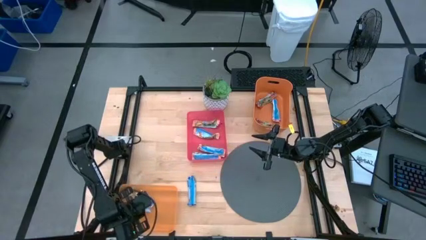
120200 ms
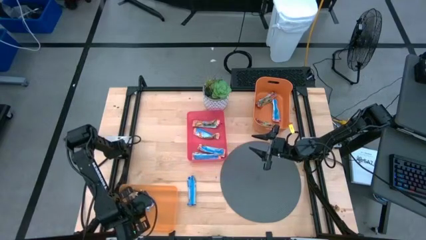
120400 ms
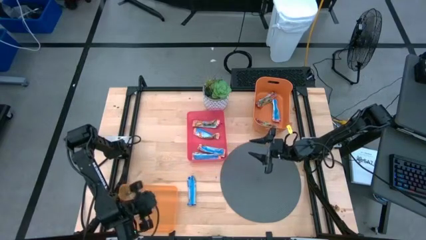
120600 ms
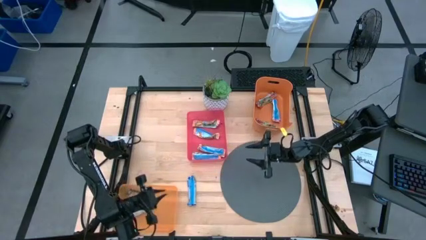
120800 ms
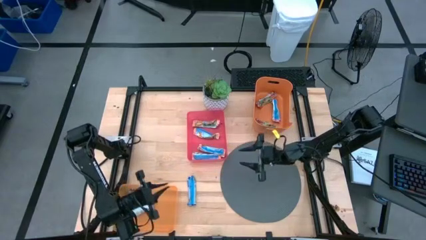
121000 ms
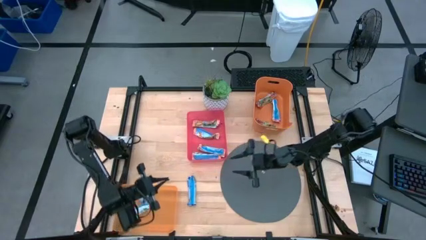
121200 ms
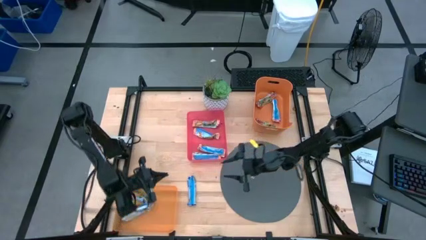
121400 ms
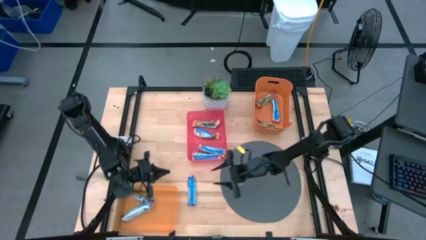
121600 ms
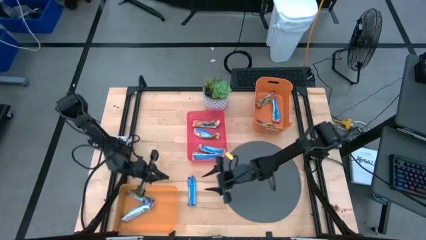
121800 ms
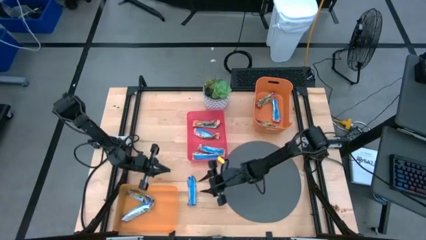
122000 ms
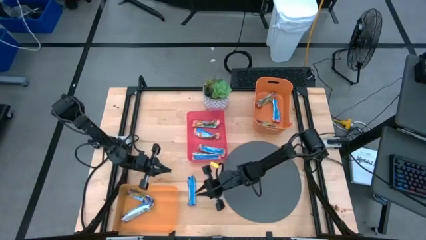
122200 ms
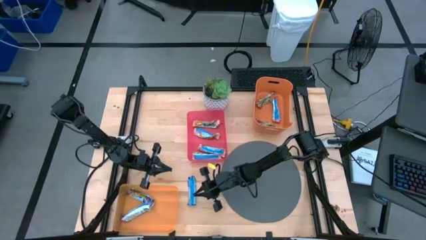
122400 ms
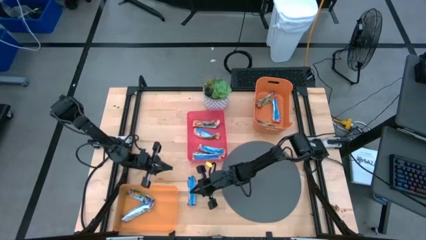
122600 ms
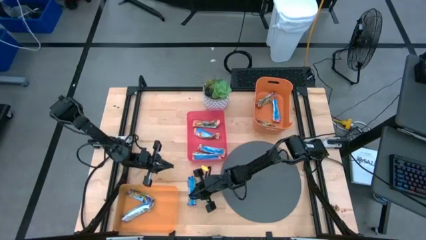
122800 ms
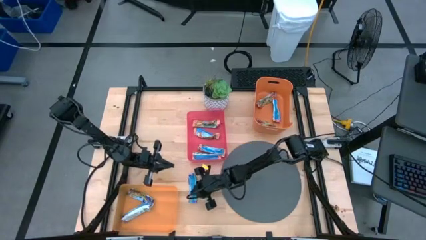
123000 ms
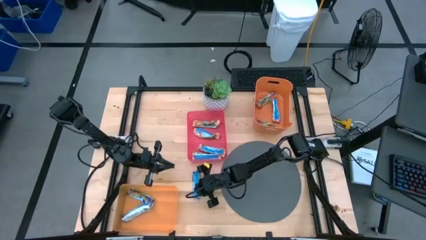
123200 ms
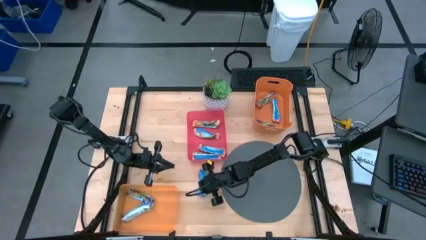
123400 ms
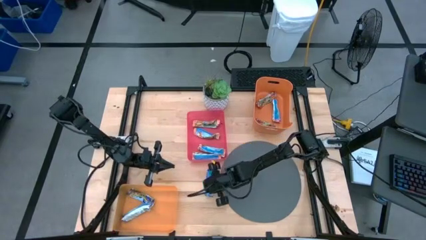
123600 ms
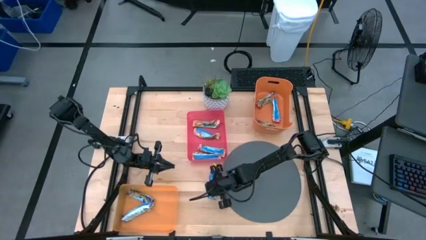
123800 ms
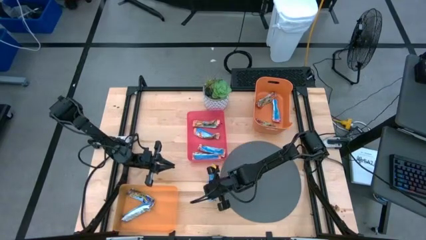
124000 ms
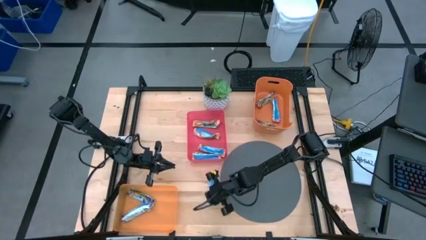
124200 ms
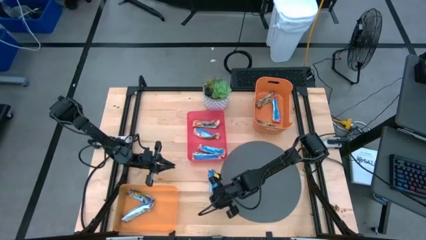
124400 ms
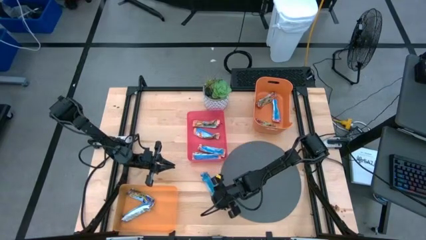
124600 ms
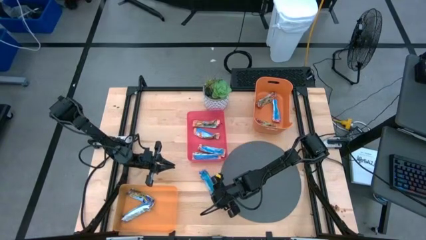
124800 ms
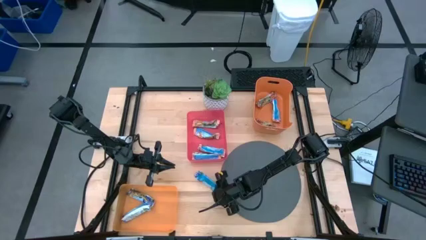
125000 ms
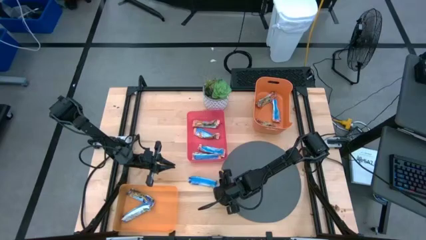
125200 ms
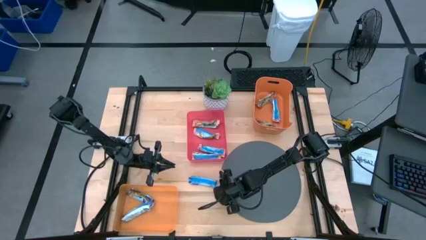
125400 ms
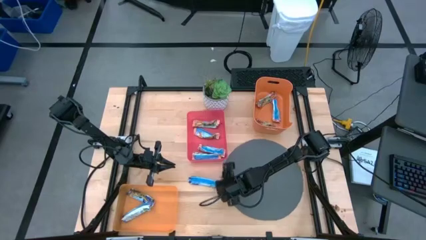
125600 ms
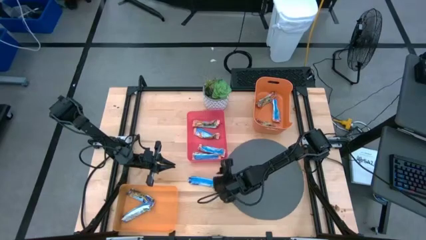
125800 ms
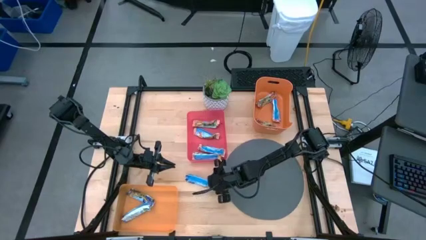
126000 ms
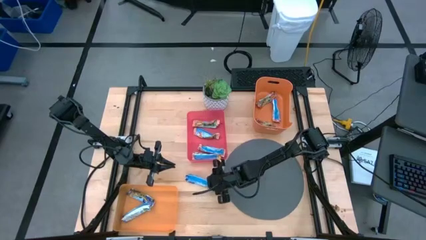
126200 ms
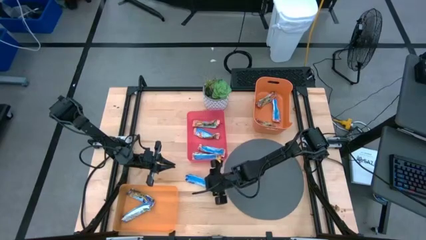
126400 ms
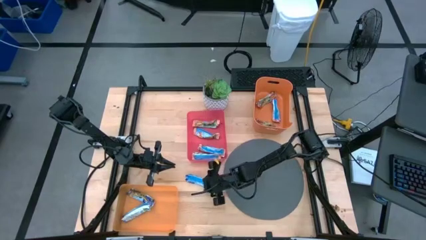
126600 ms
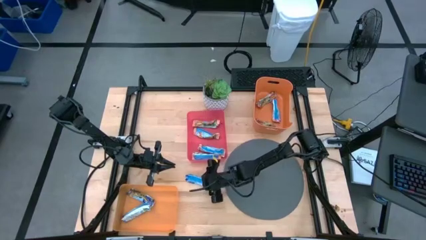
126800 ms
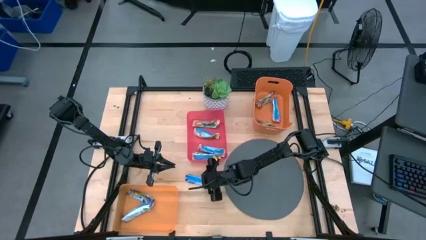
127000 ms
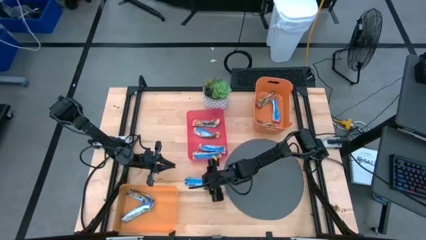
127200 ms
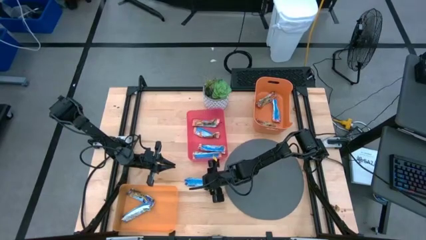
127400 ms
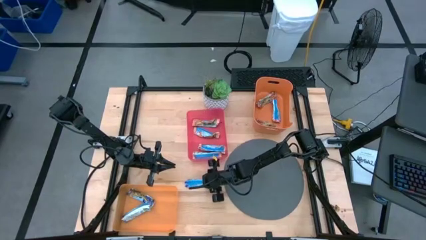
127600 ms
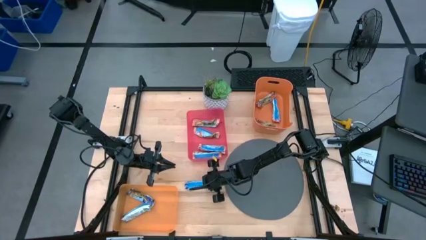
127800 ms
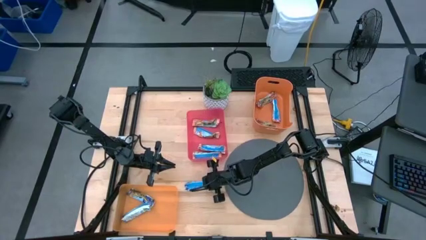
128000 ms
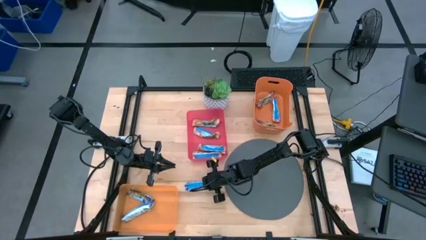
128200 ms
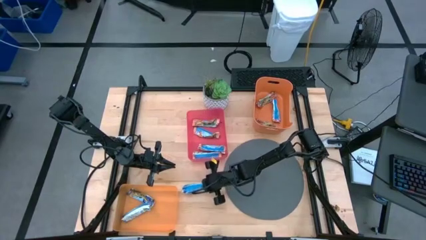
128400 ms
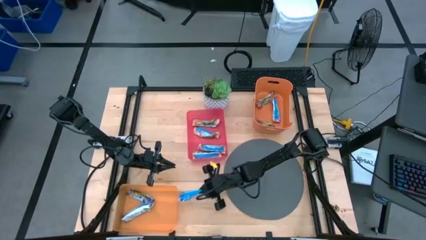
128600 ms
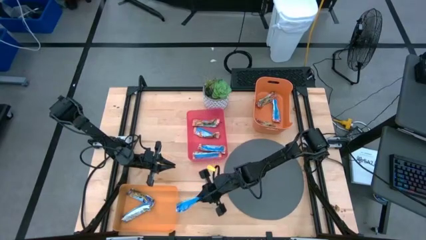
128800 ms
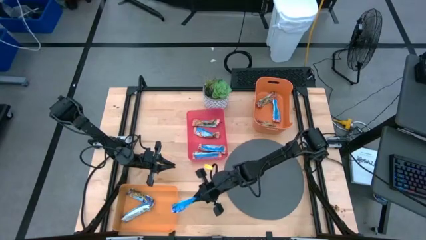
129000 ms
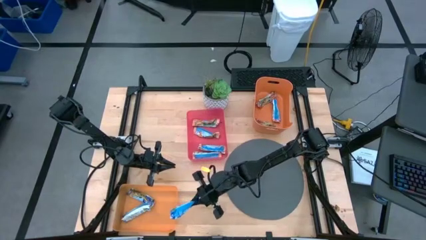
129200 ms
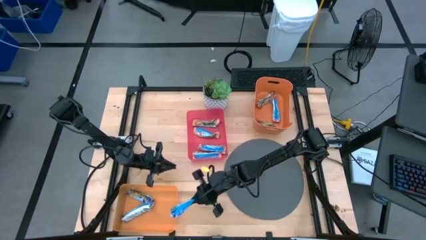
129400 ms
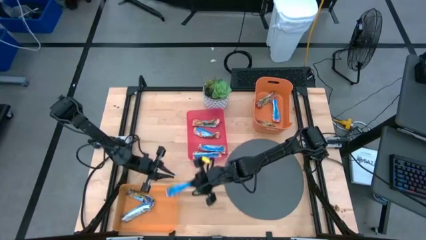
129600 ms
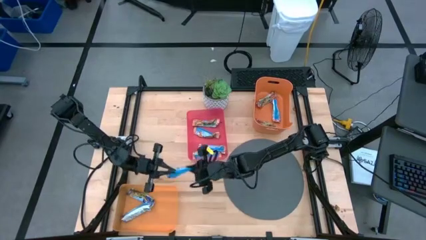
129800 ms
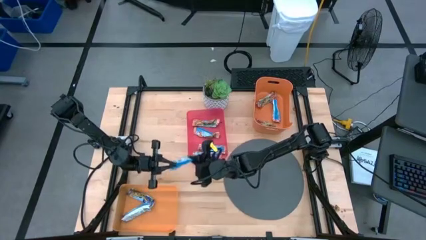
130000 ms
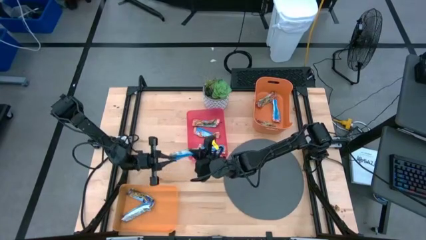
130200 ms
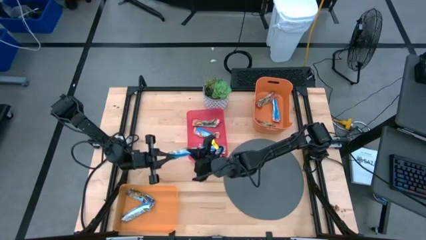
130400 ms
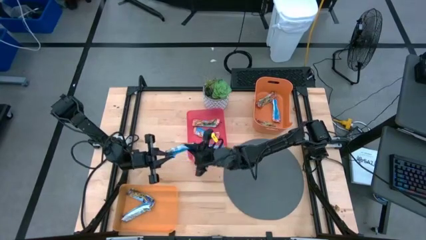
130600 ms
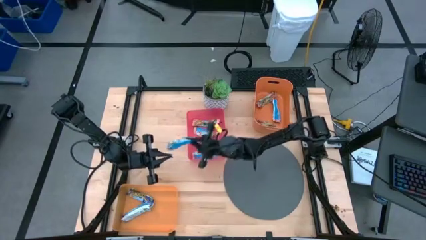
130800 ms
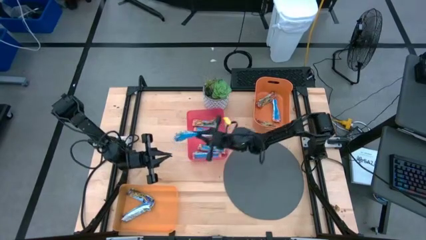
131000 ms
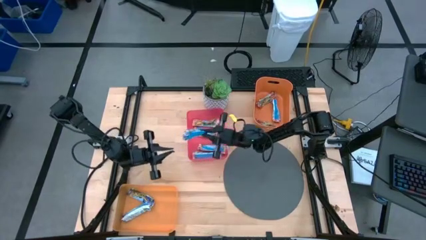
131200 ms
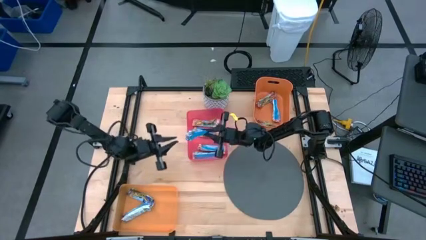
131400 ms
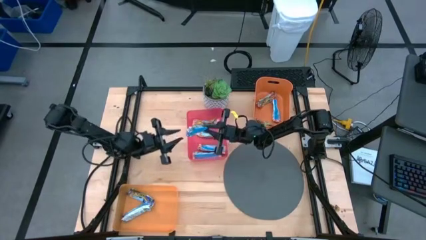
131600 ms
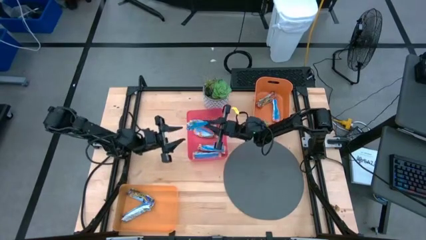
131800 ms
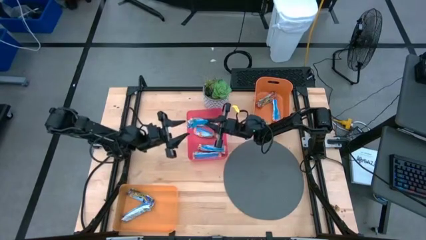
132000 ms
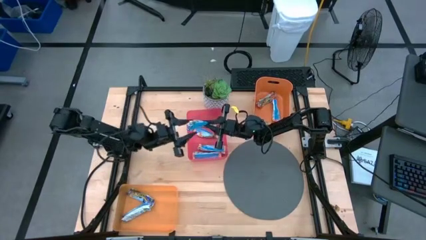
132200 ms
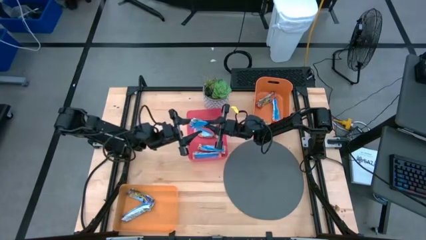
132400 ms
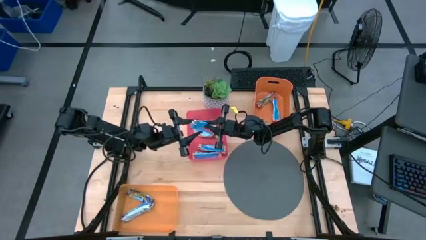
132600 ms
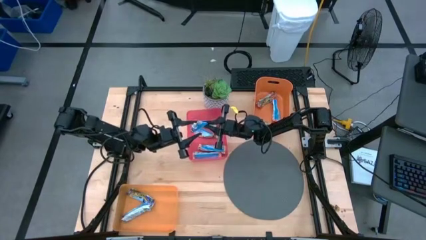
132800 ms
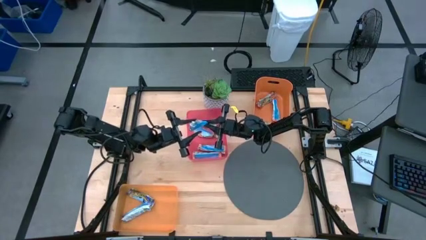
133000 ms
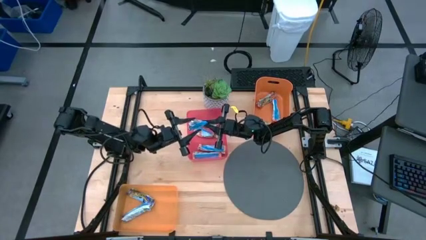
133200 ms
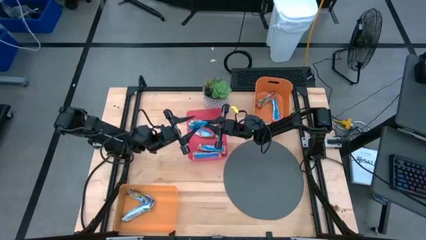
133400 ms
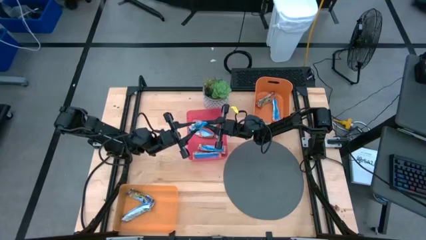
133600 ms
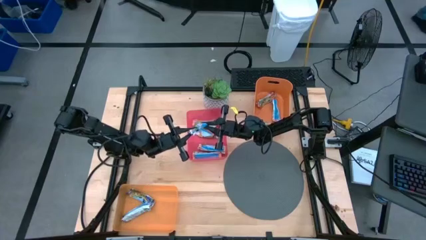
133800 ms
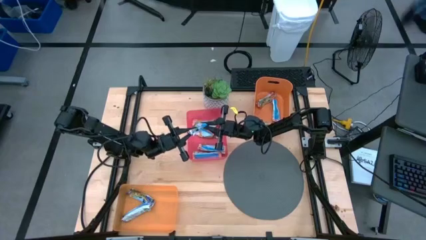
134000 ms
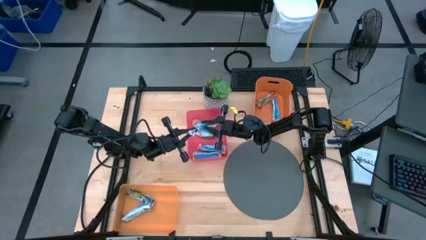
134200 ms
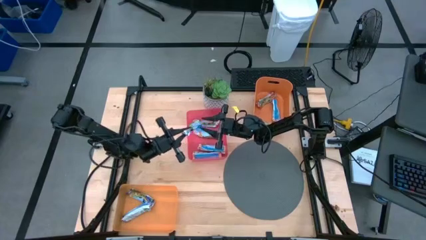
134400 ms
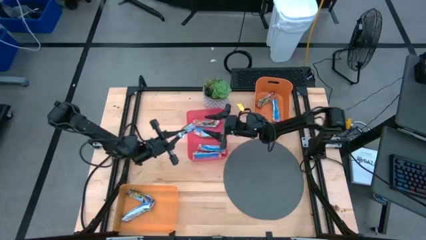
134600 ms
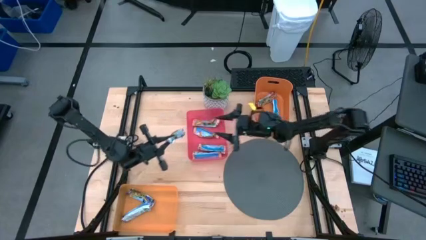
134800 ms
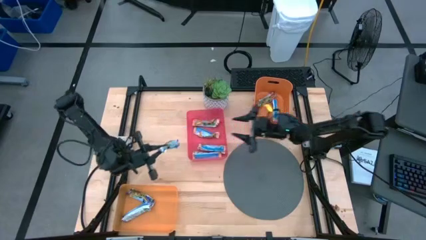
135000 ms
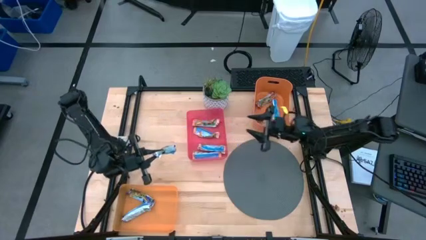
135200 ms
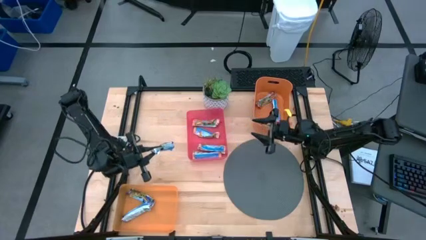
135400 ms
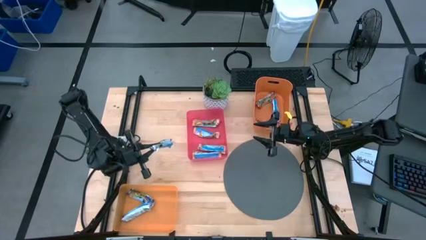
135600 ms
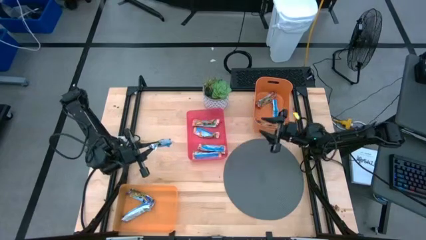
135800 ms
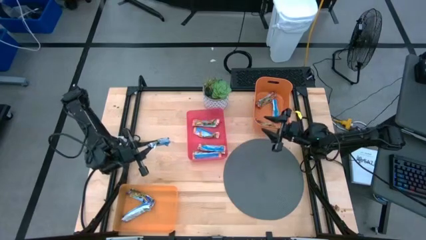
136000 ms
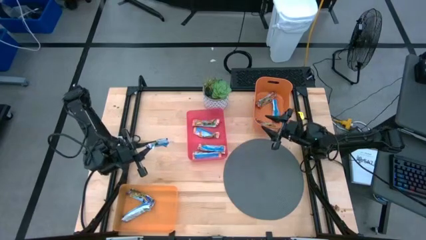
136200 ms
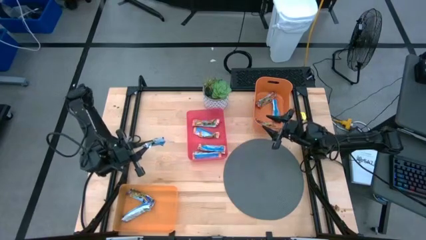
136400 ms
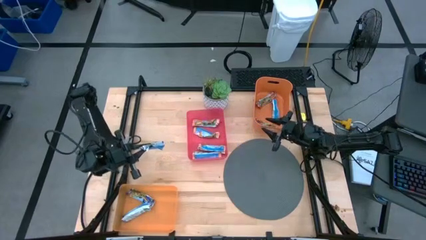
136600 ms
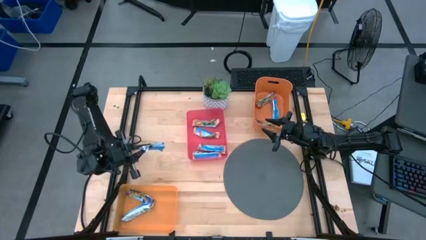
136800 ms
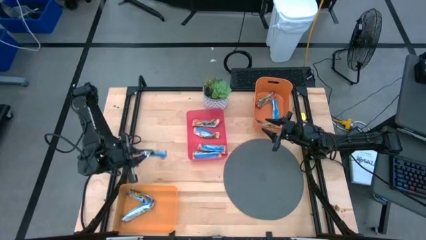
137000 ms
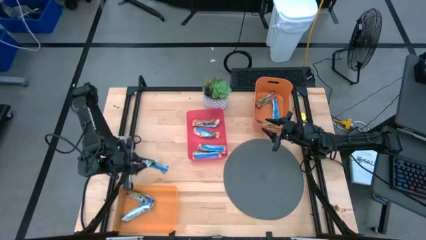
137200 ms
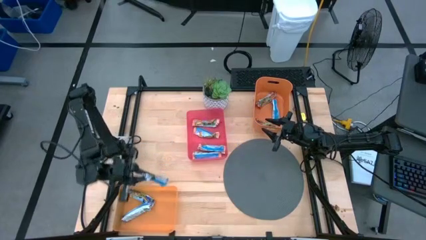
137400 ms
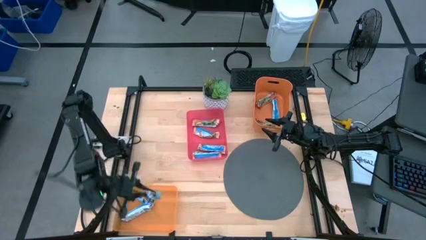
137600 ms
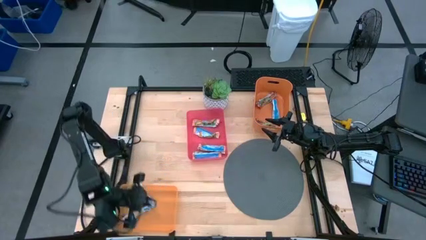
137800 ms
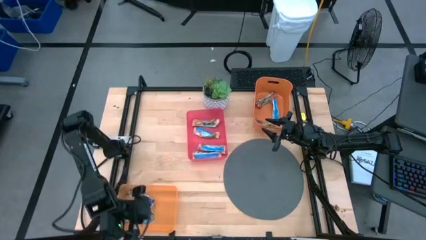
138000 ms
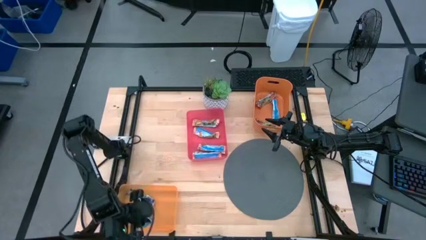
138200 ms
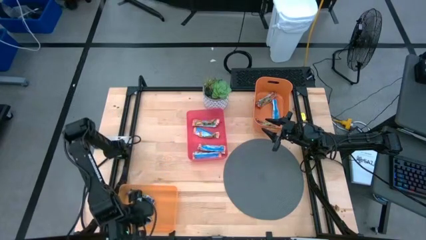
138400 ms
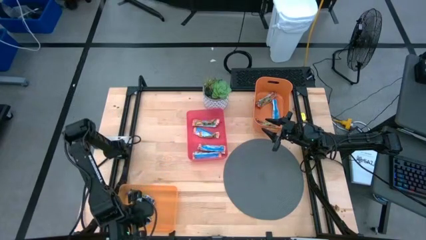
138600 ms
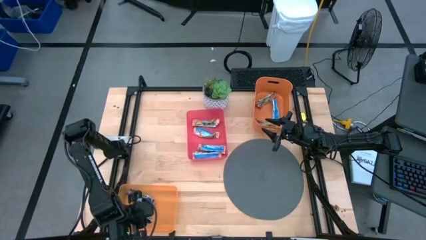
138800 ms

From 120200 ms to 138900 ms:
Task: Pick and place Granola Bars by type
Put the blue/green granola bar into the bottom orange bin
